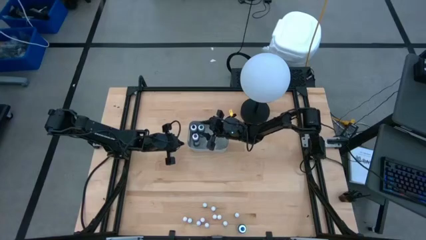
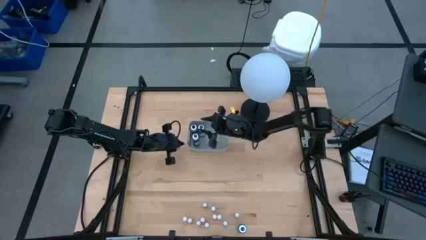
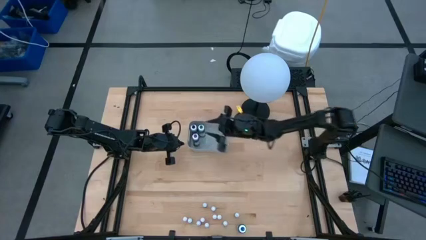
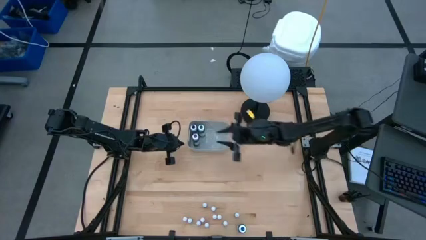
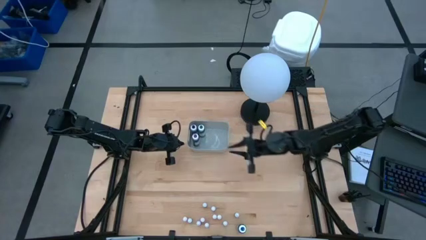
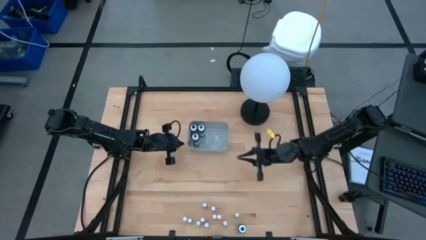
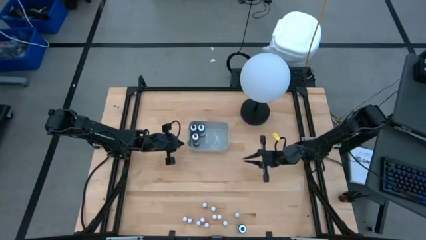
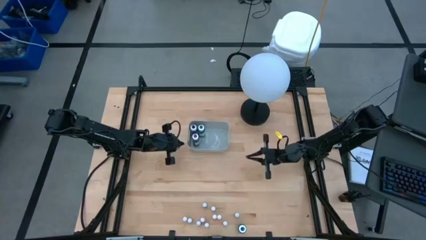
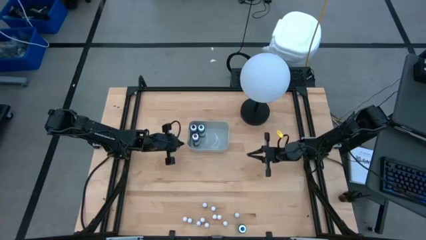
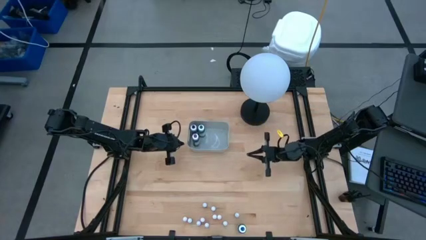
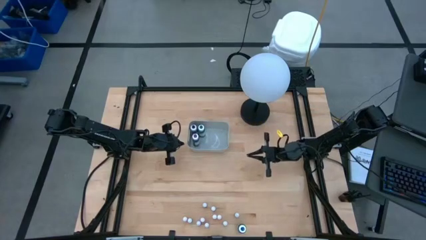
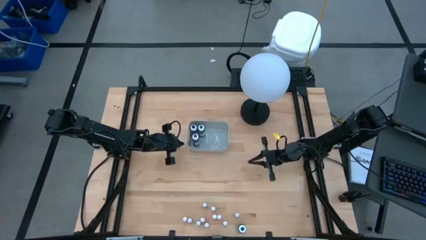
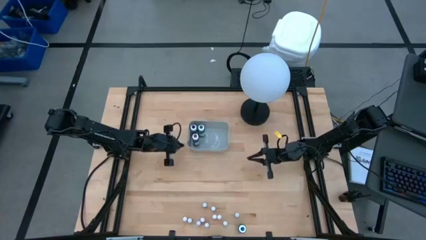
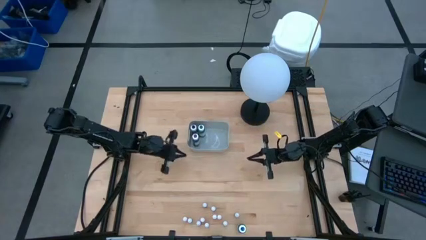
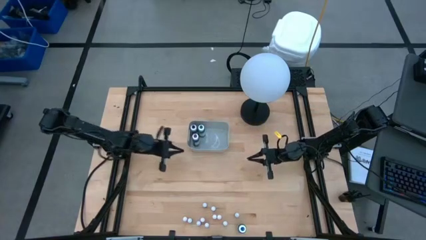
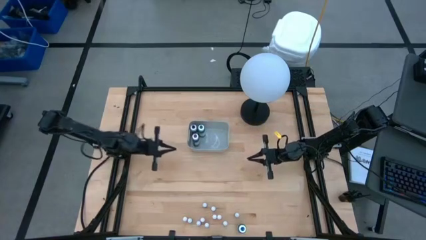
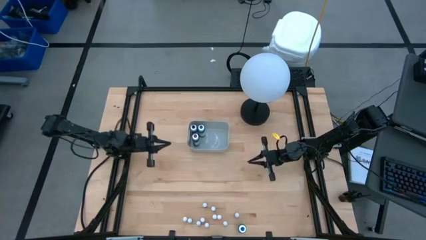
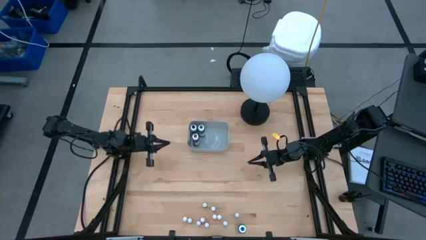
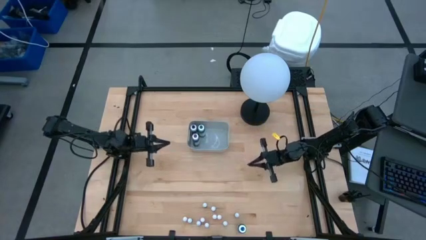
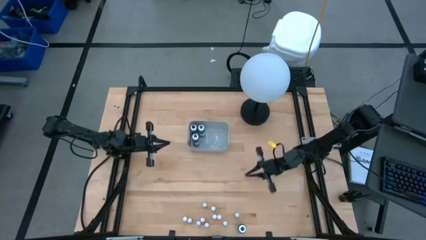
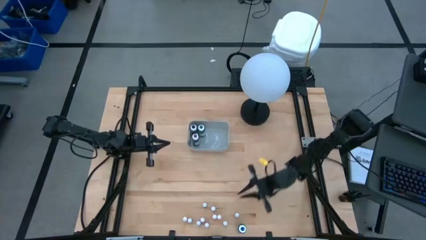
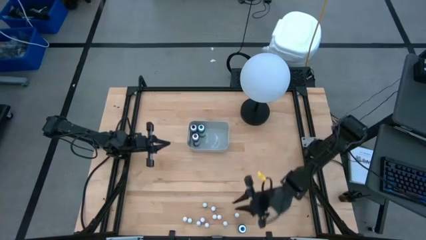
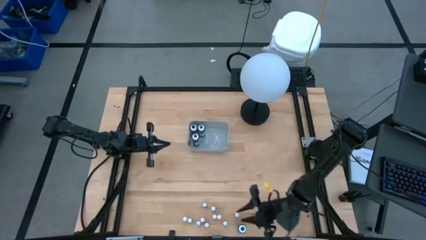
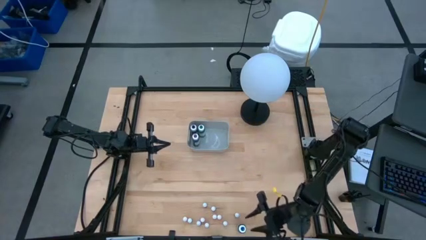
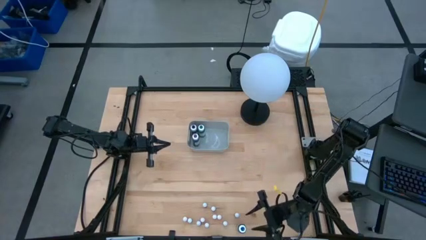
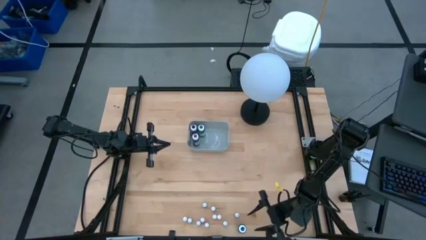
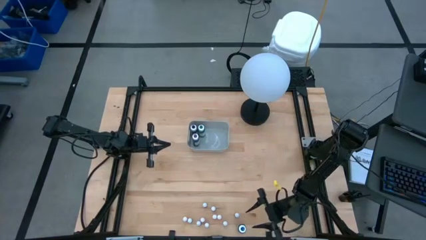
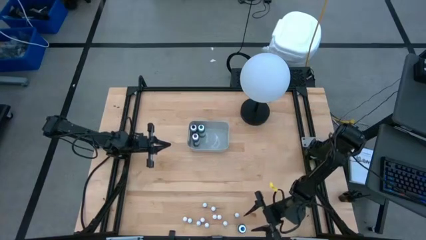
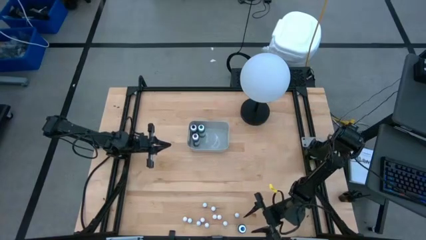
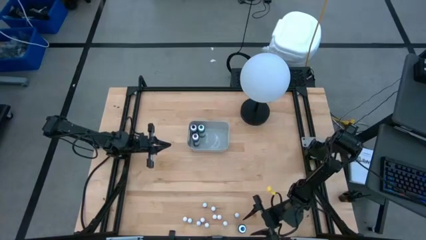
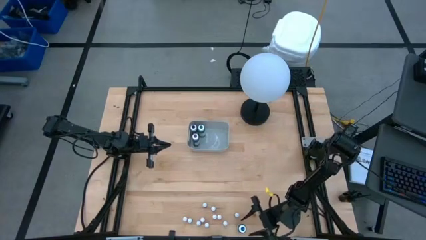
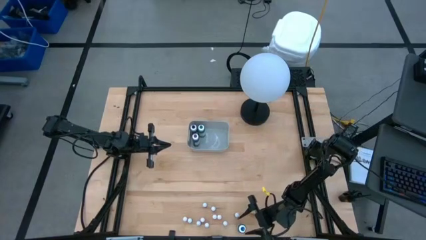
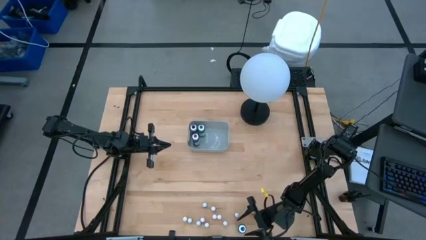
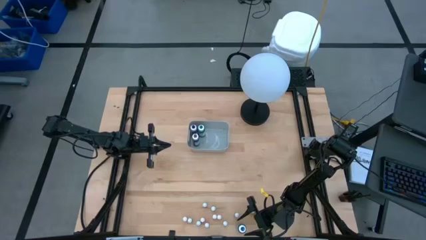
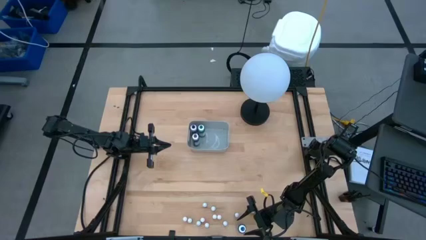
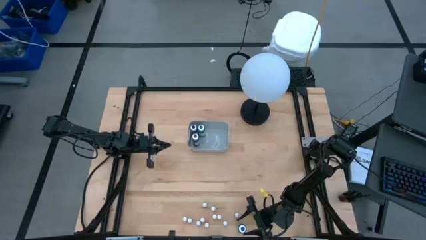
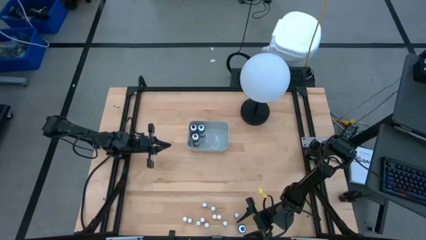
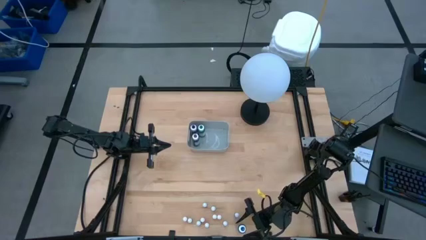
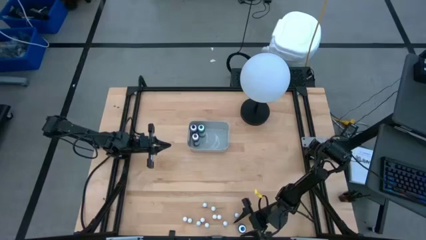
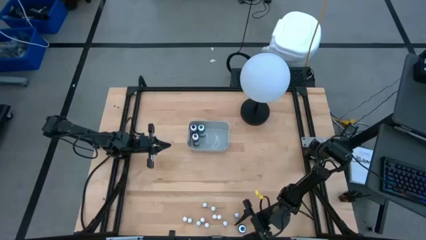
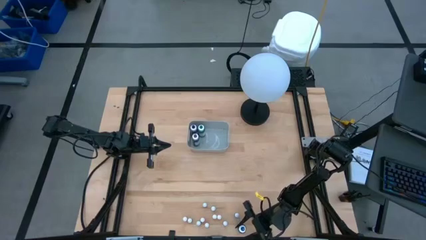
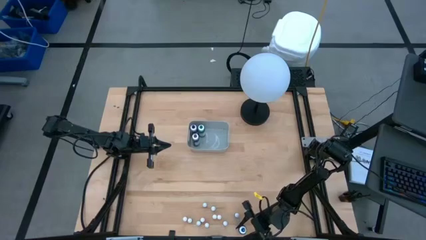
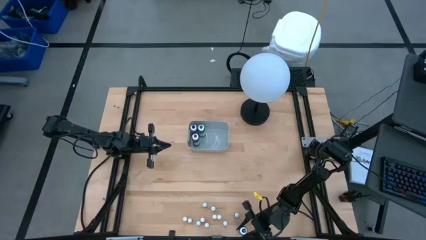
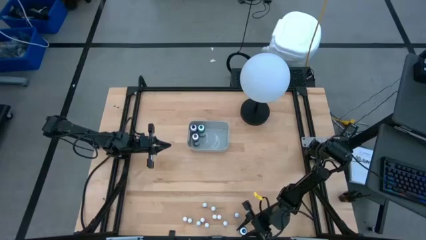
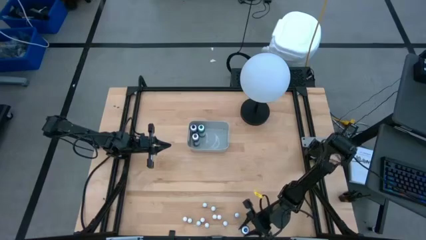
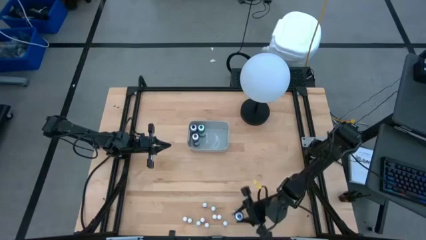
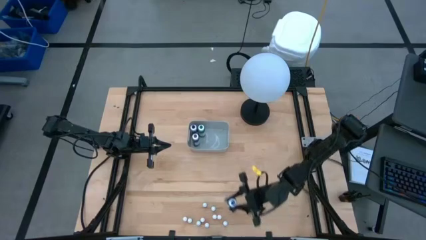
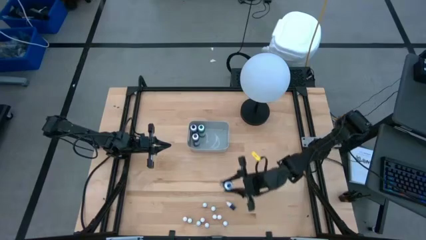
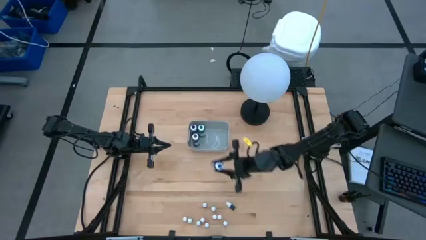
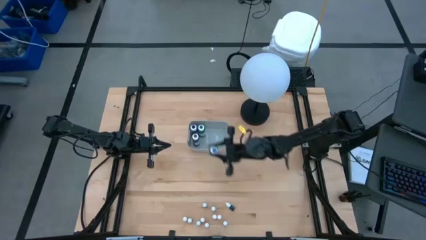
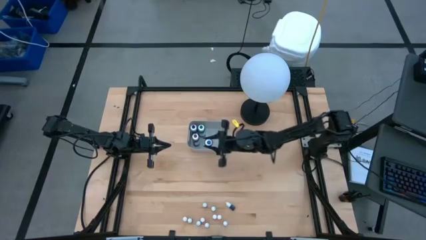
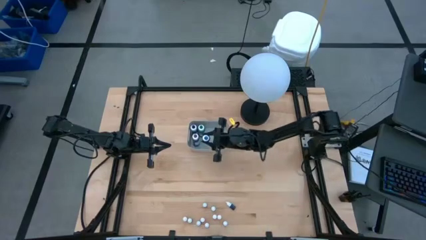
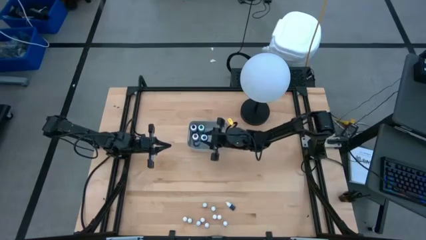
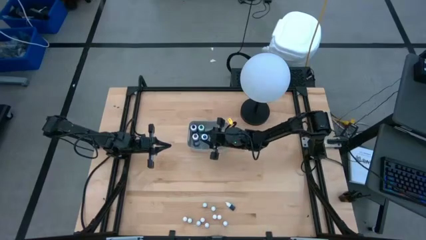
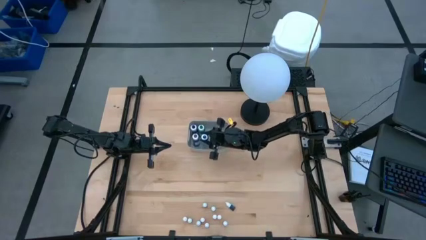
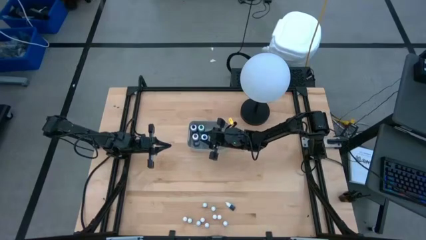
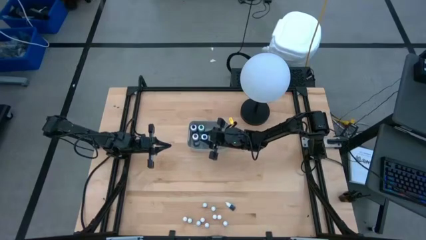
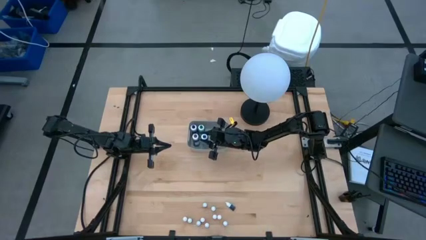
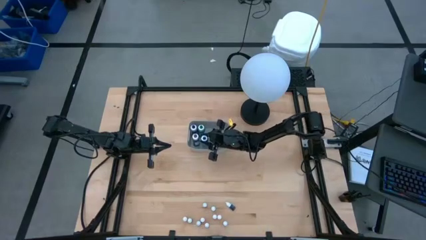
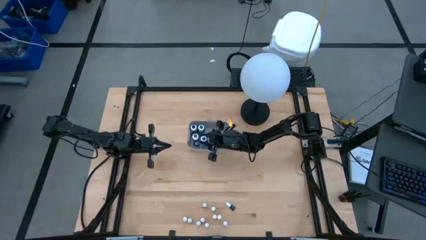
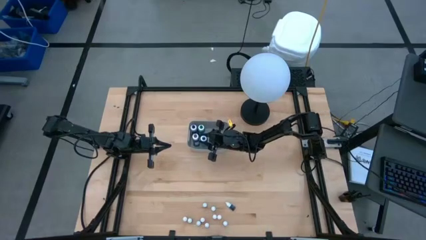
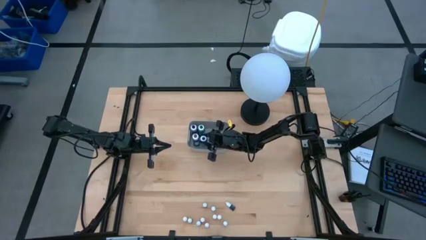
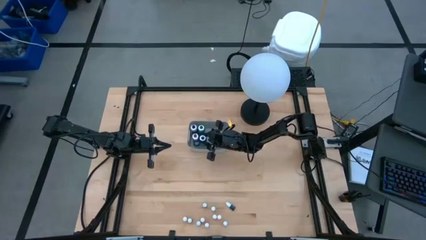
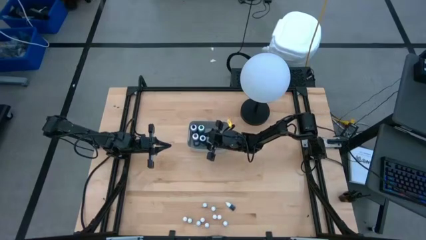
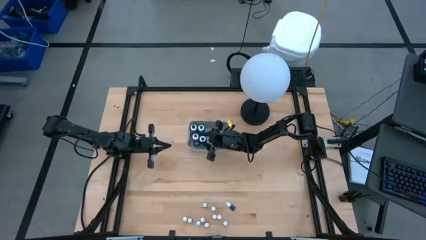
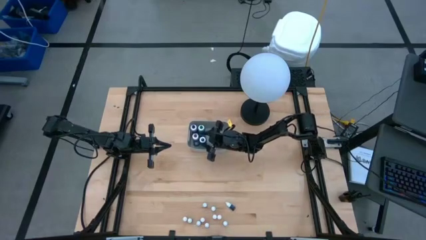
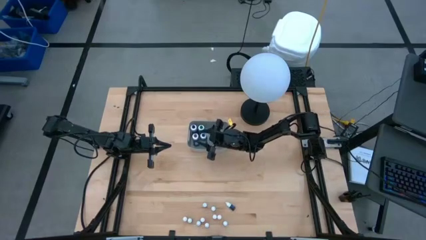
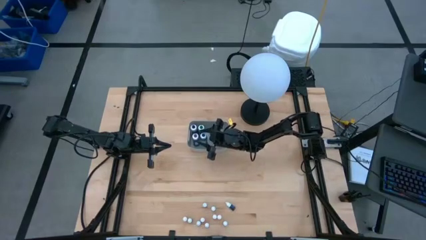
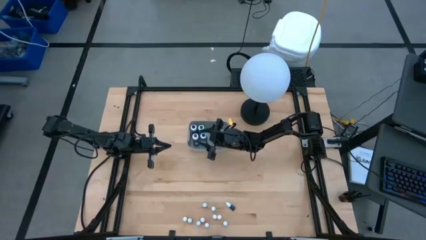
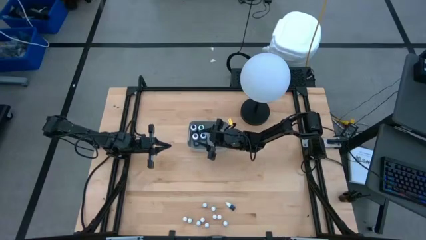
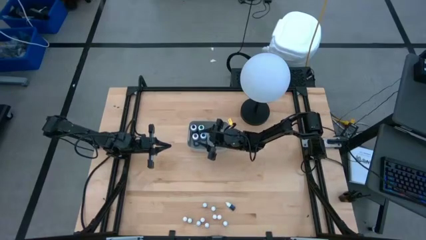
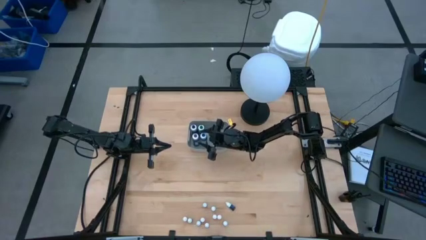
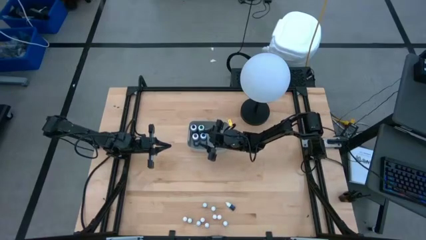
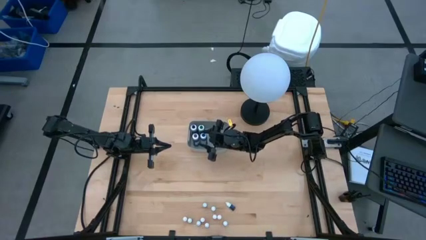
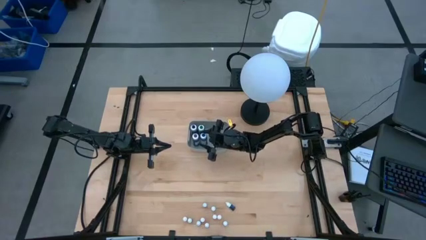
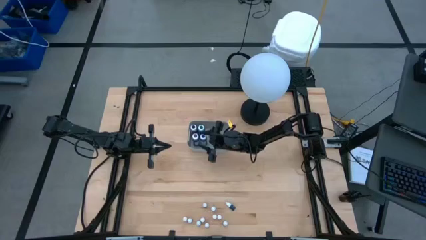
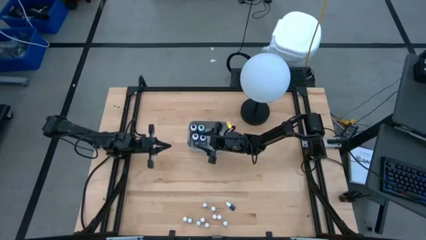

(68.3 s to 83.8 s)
Task: Pick & Place food coloring
Put the large blue food coloring bottle into the gray bin
